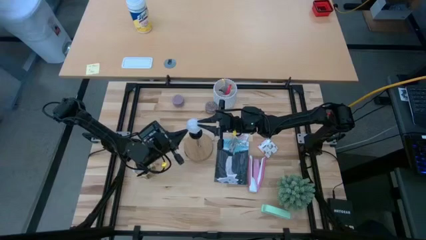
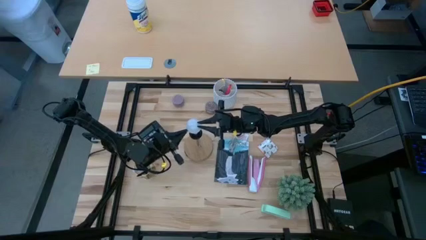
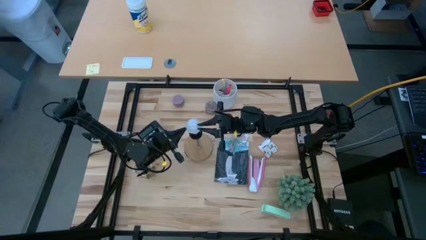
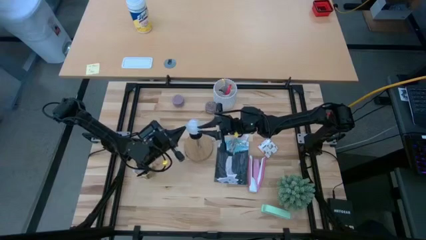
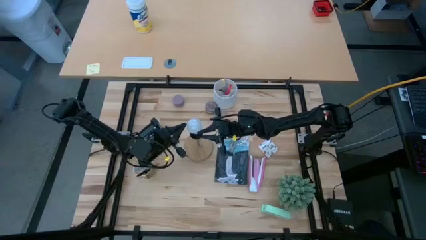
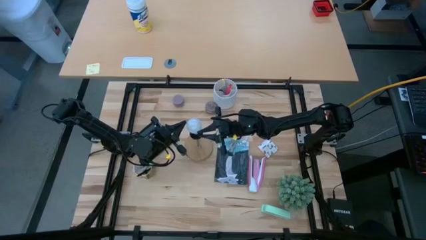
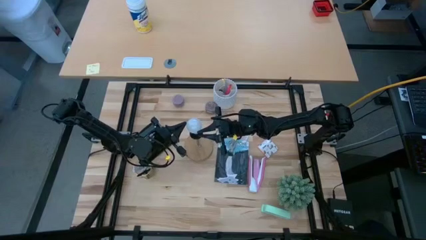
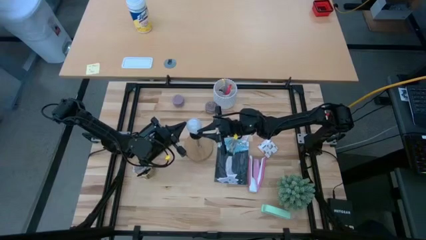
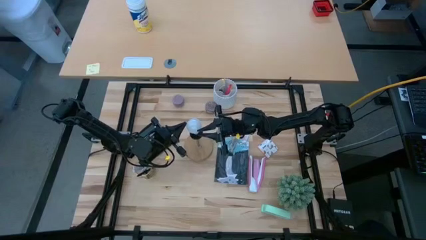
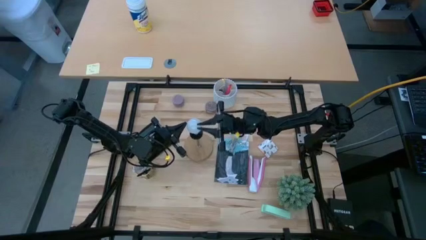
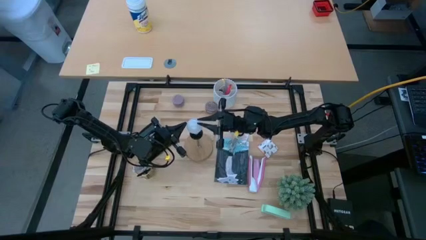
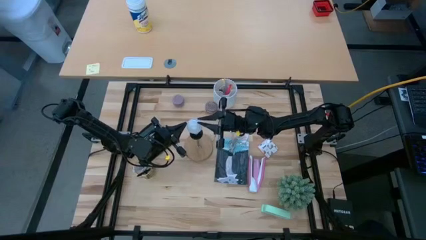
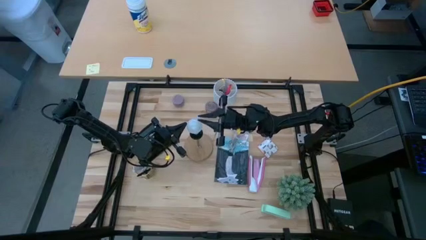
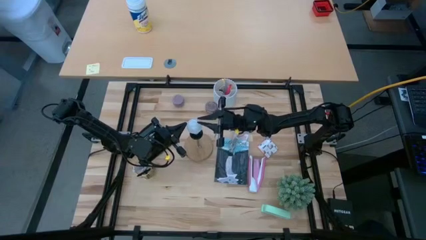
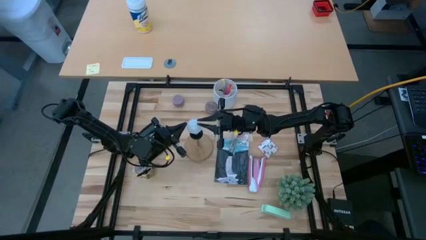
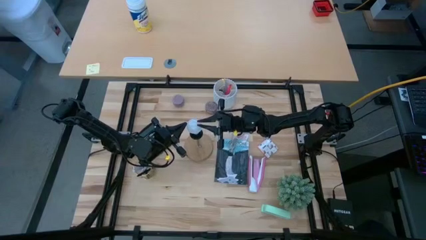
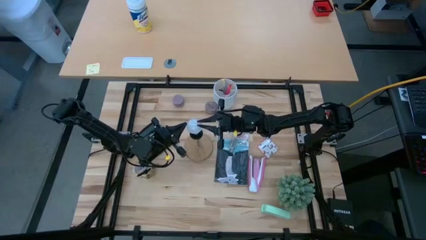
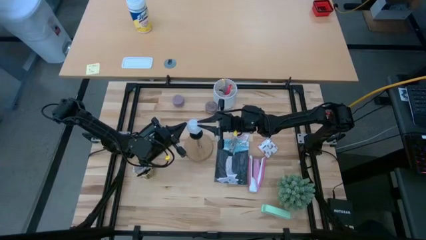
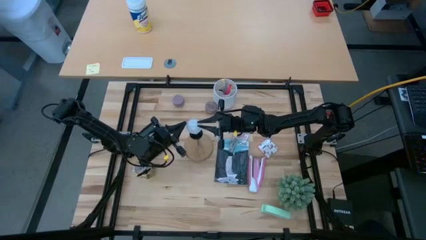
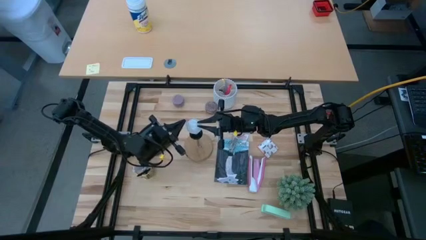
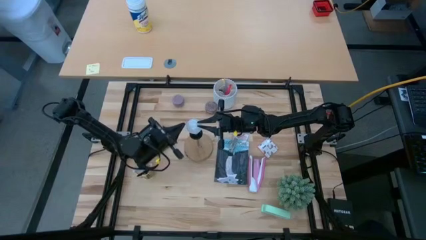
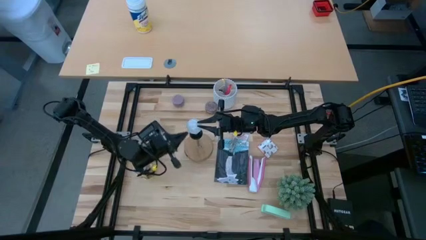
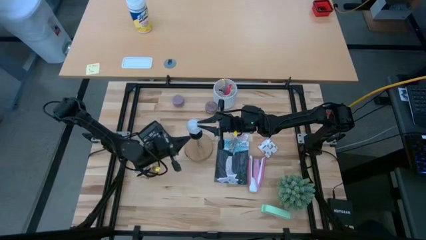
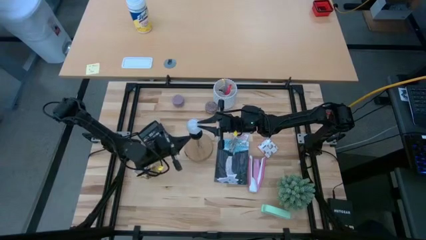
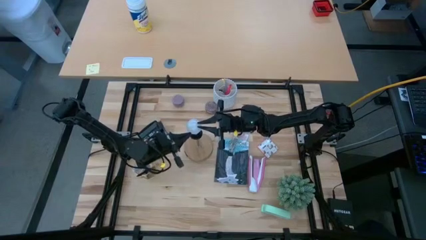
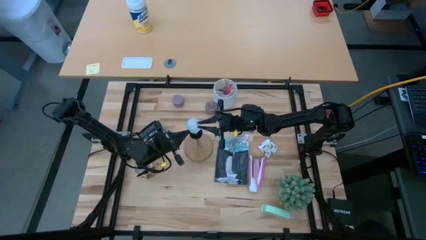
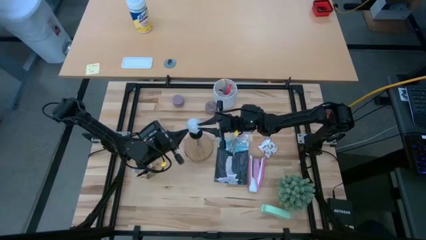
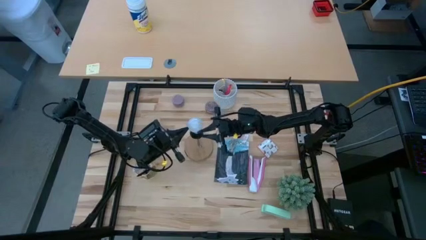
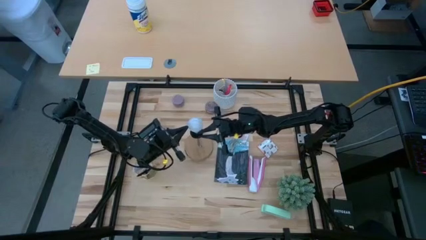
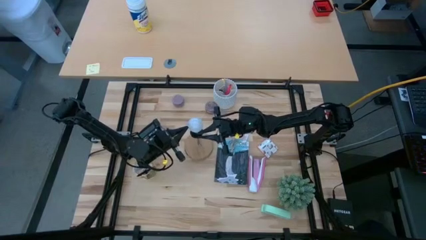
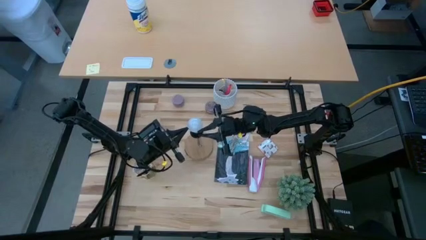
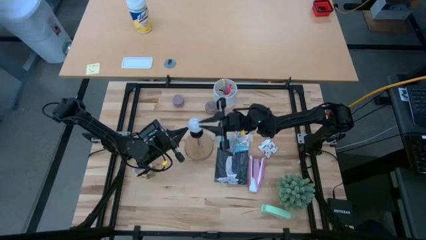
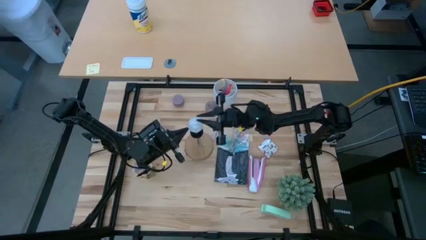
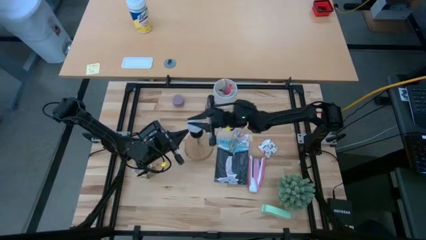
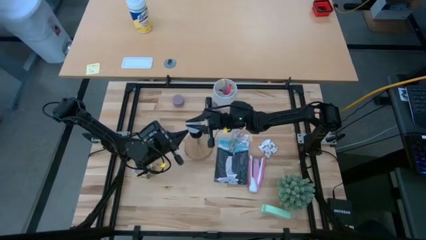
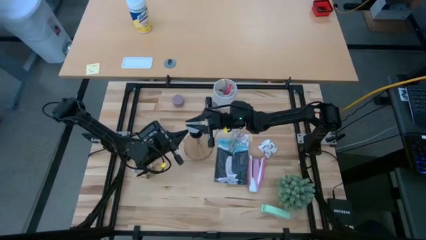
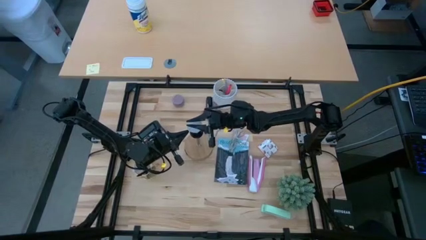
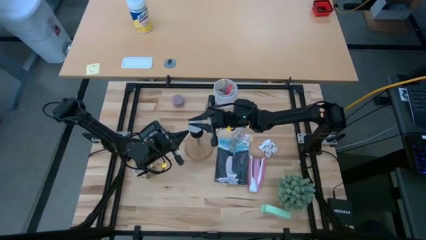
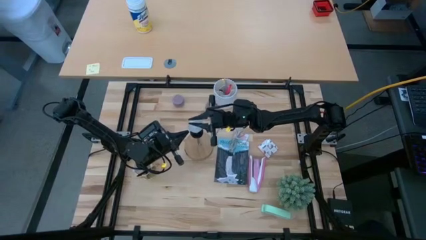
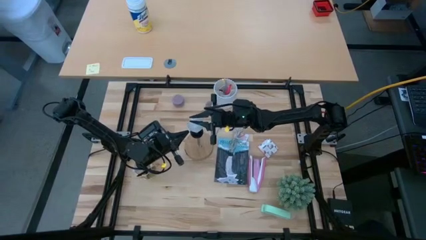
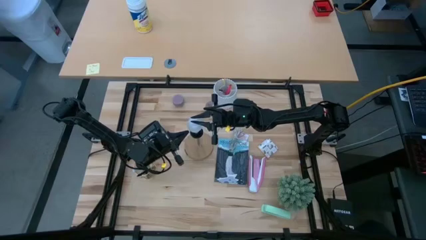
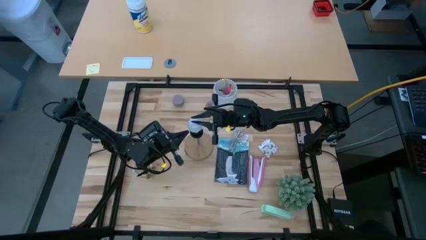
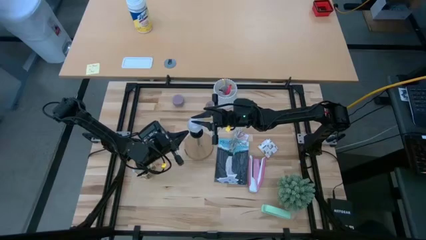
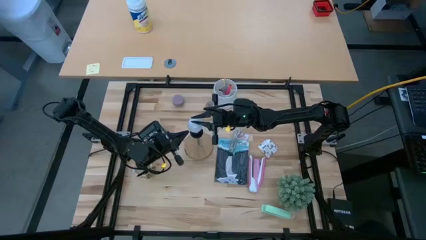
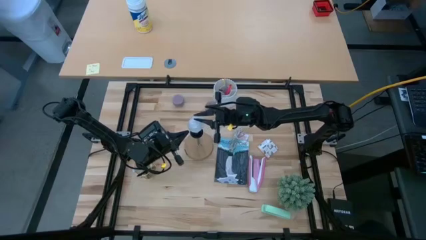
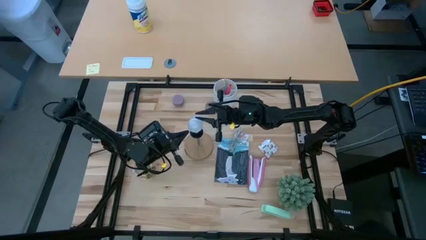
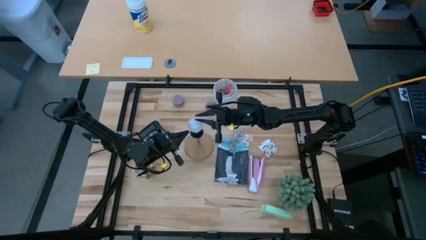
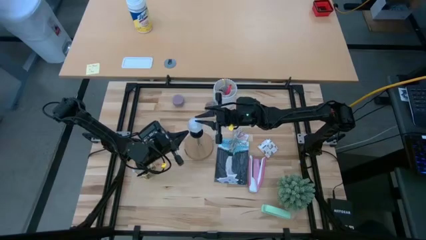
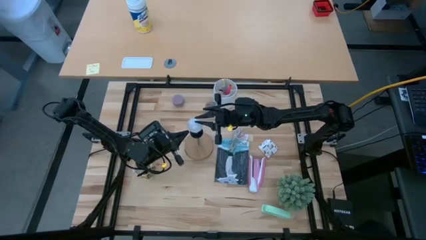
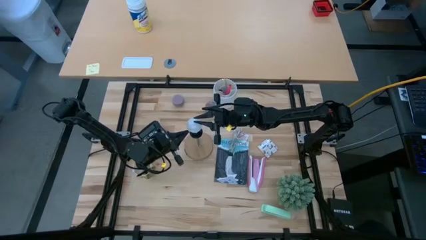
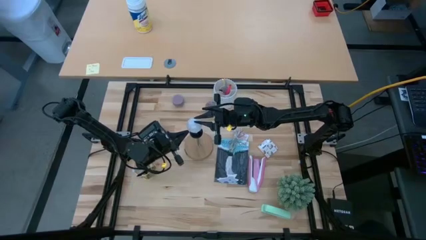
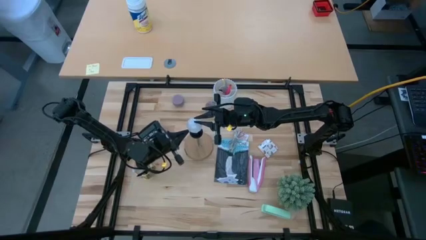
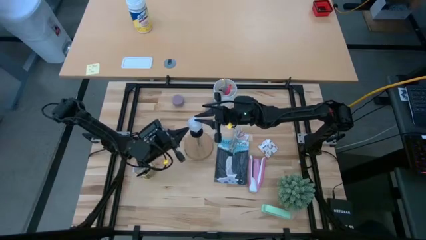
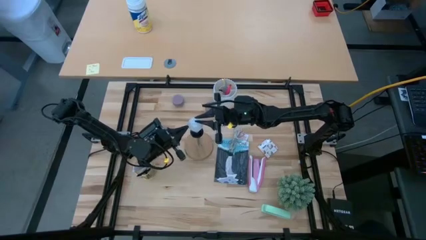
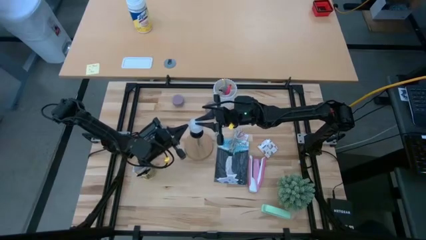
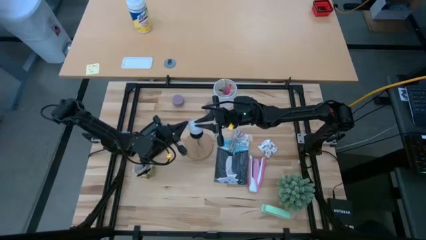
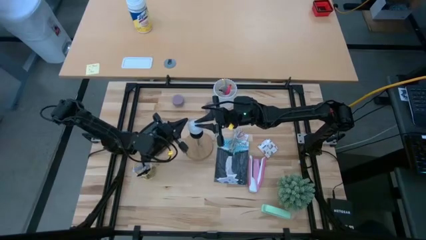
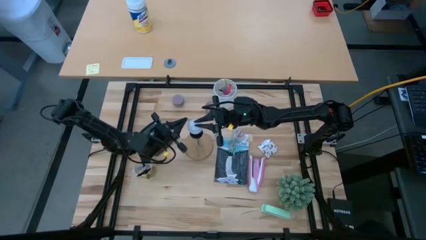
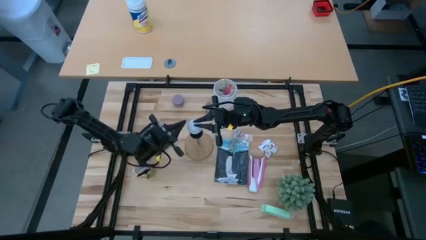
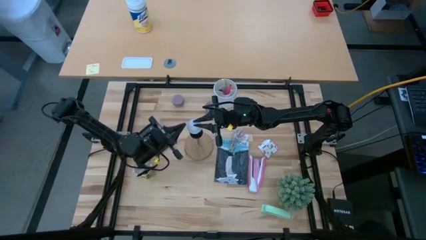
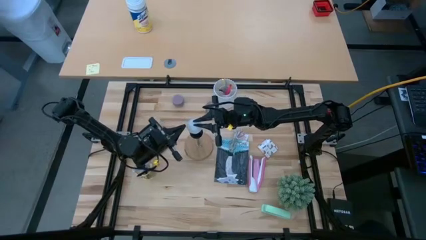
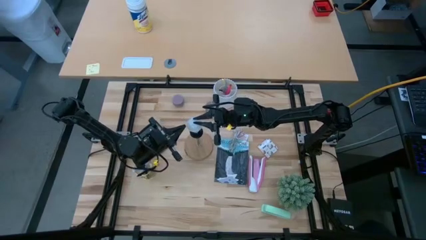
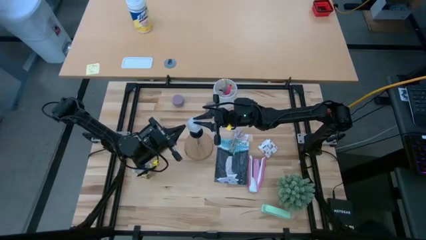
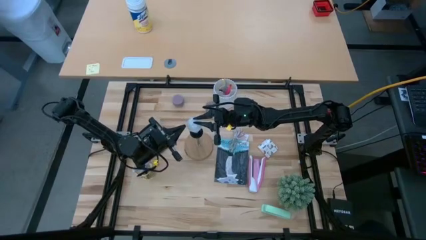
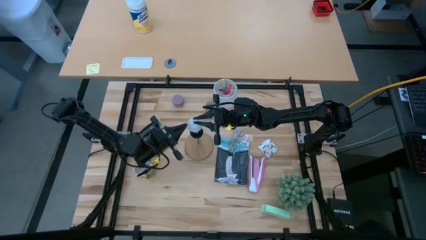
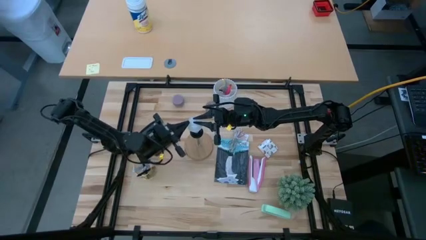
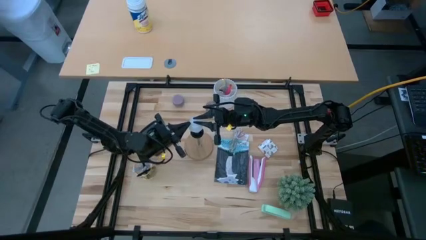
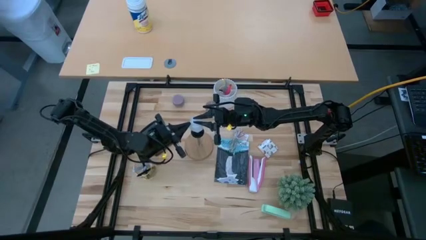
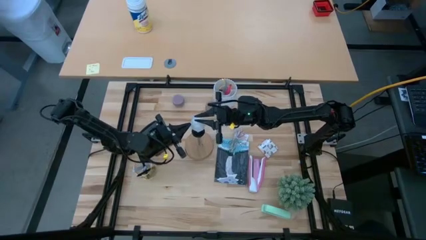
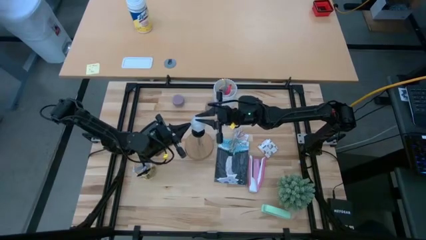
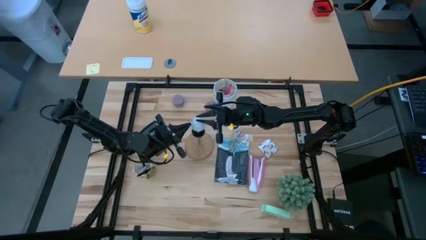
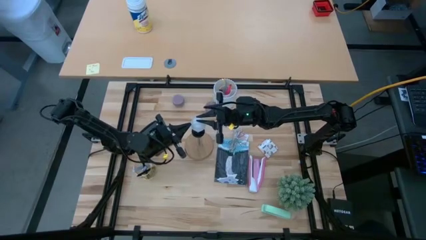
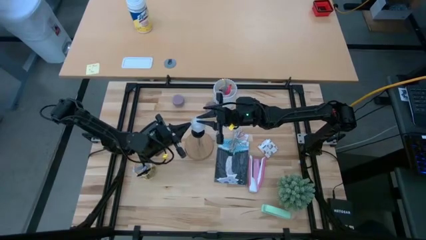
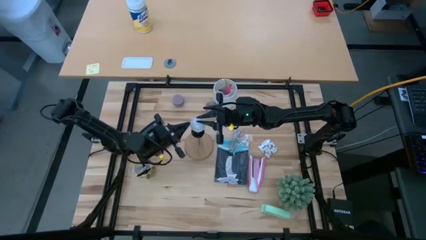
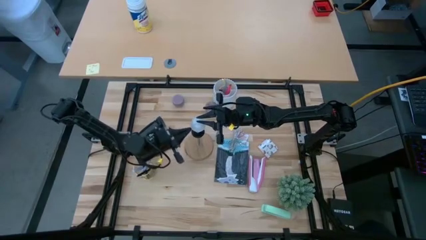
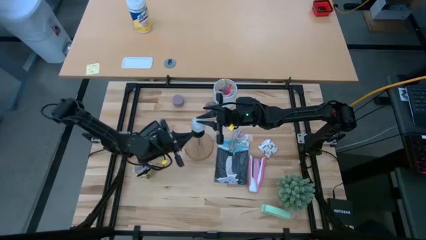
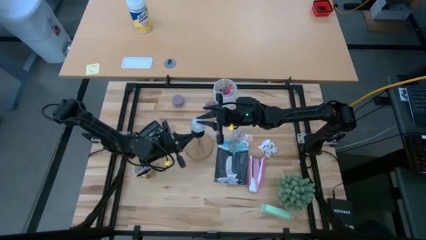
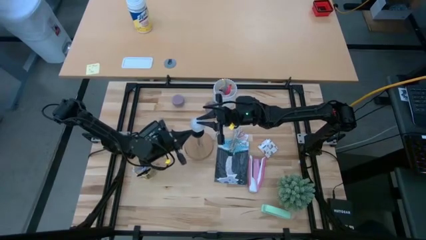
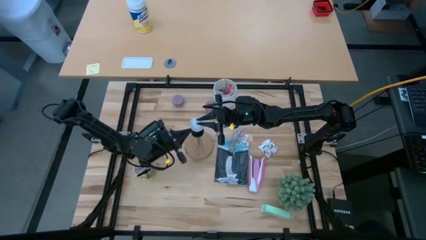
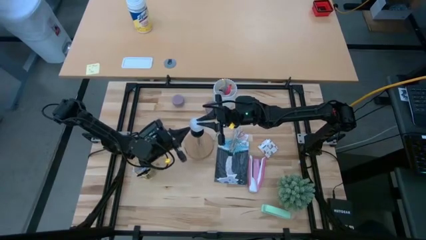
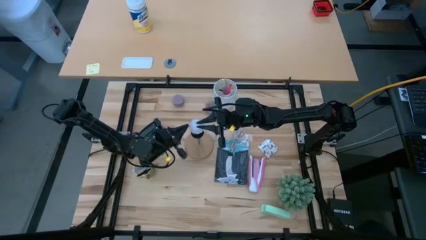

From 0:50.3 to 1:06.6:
Task: Screw lightbulb
Insert the lightbulb into the lamp
